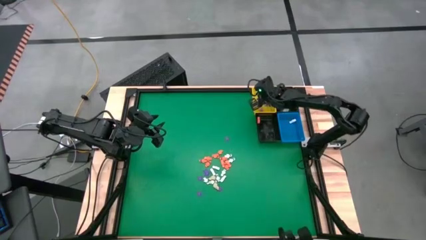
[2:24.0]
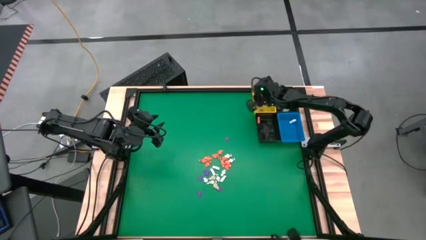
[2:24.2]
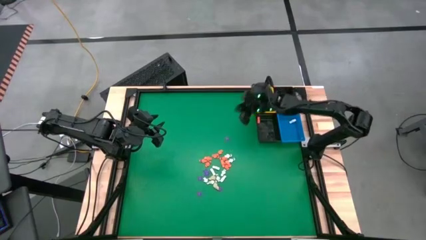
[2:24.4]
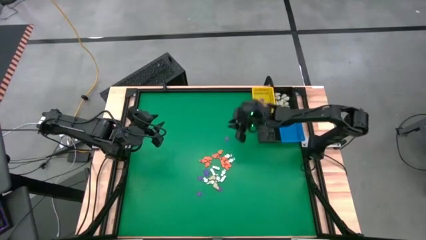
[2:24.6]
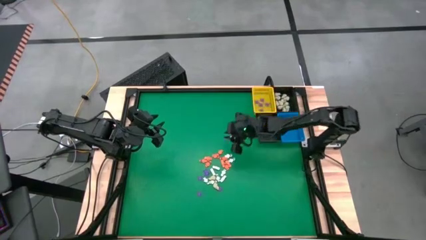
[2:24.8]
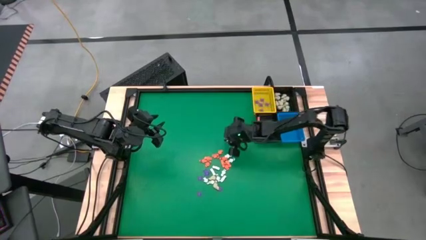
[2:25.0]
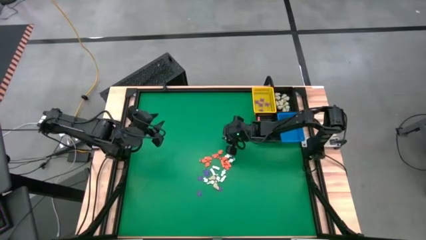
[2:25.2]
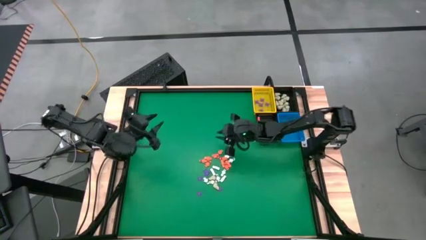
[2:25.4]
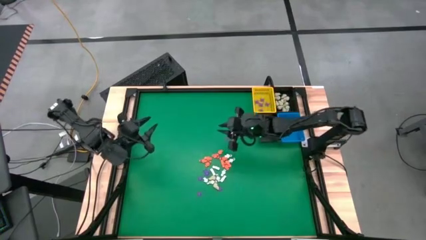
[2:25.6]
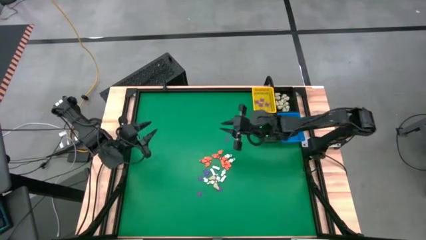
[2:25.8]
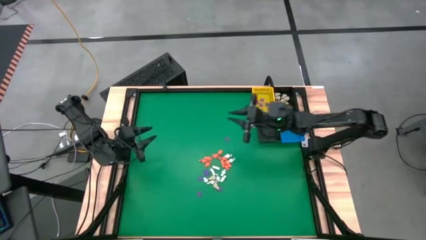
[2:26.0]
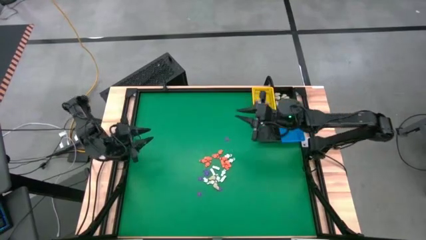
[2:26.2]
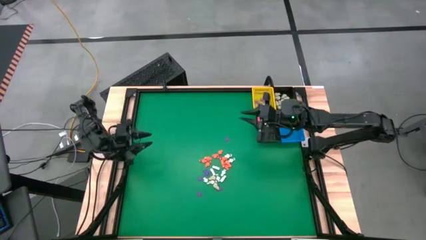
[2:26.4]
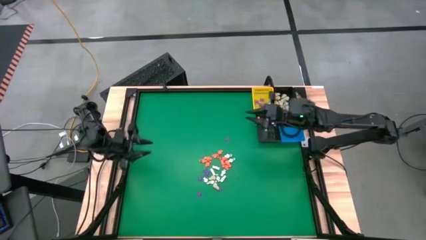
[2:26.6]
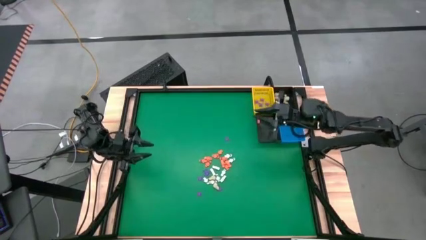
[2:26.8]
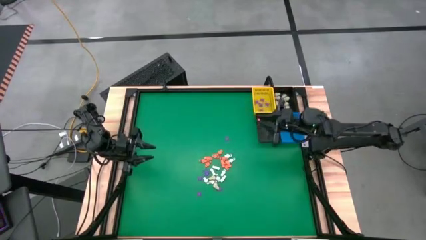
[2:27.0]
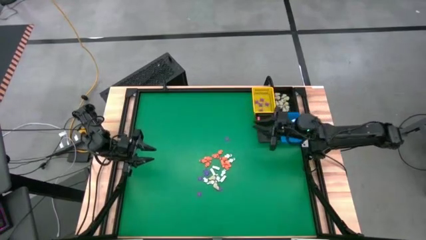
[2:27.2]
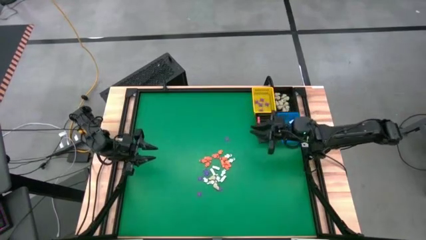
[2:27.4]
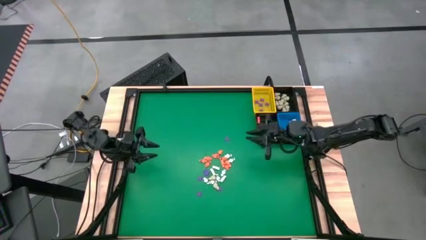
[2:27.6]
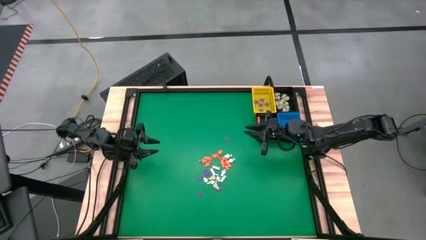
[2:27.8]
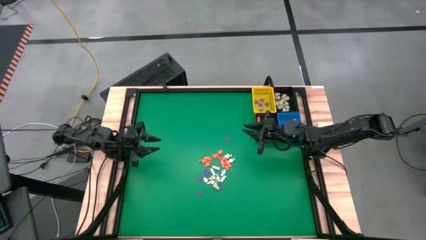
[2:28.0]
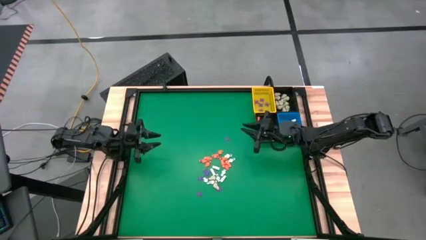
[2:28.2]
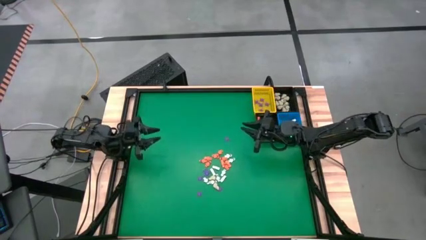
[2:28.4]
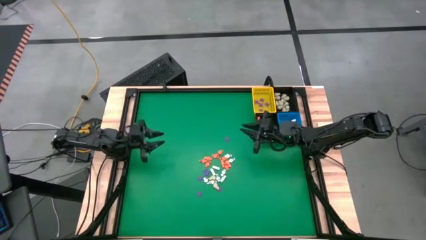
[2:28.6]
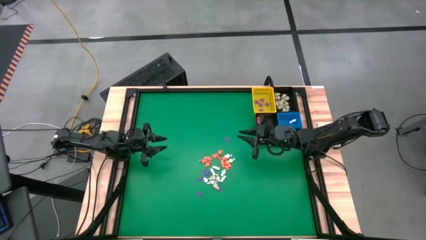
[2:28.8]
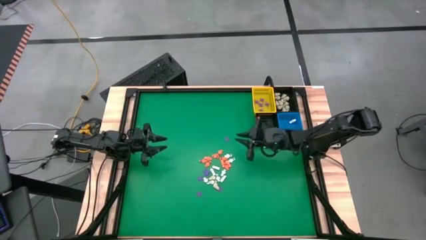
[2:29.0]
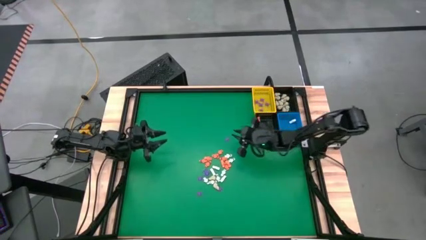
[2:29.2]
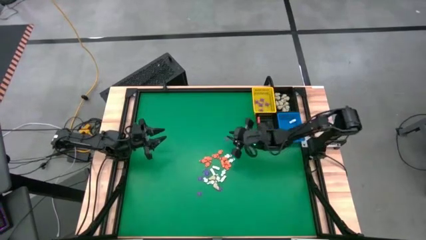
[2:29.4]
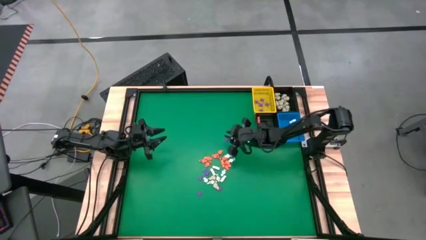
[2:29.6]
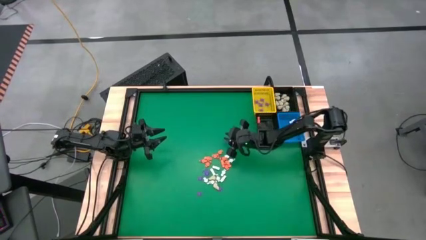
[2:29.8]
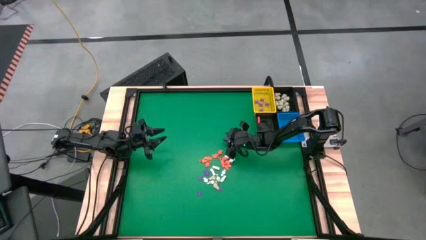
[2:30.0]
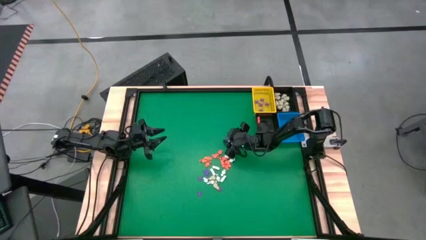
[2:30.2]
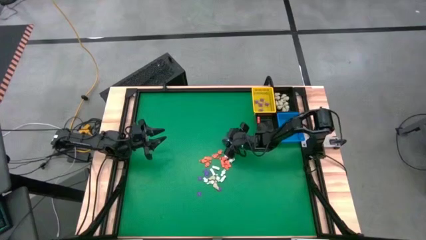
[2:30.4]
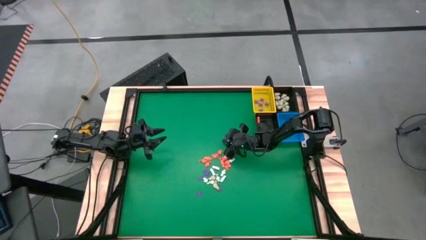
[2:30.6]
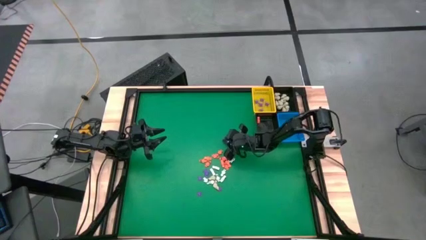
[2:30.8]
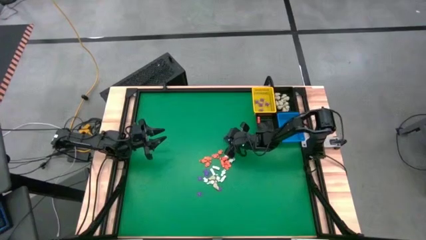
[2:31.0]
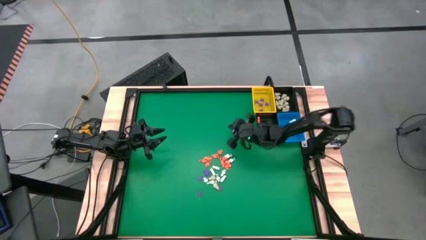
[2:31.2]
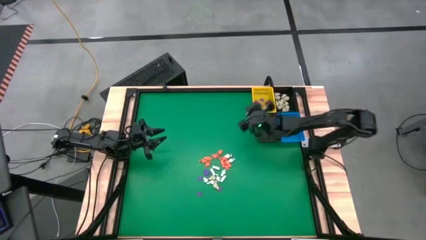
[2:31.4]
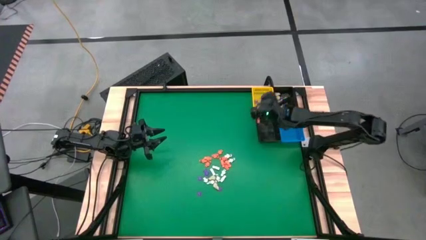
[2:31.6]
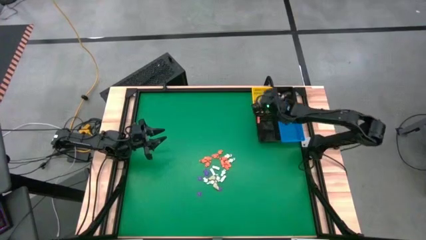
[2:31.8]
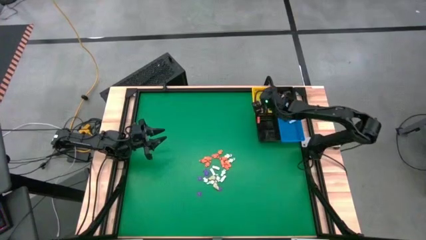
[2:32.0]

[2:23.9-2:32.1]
Task: Sort Halloween decoration
Put the purple spider toy into the yellow basket

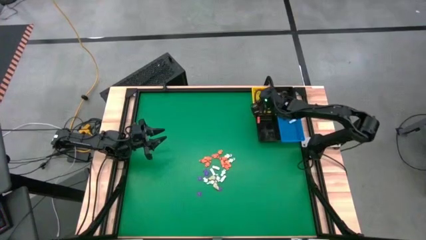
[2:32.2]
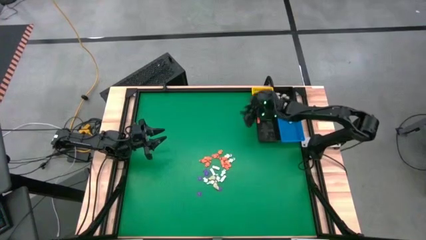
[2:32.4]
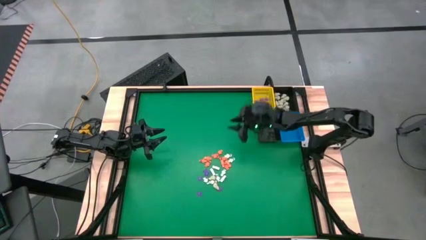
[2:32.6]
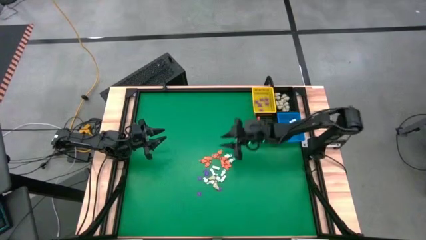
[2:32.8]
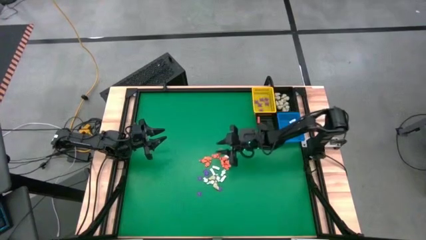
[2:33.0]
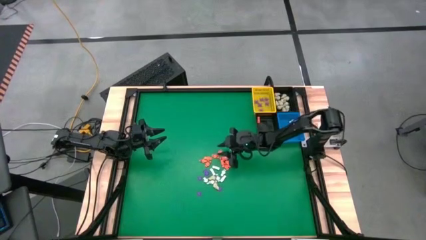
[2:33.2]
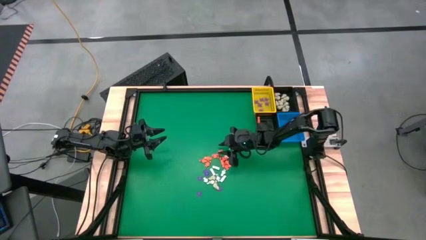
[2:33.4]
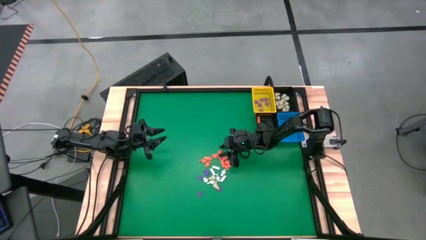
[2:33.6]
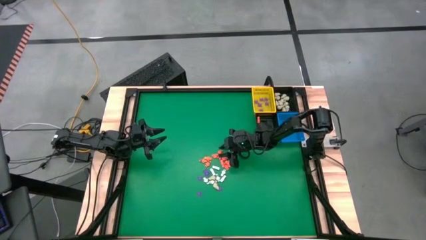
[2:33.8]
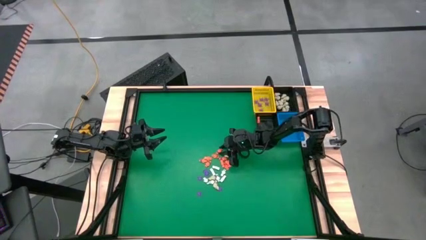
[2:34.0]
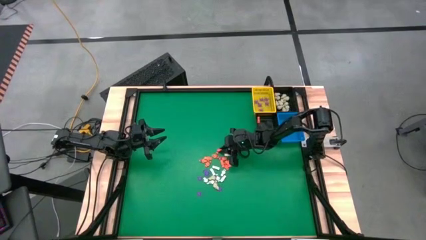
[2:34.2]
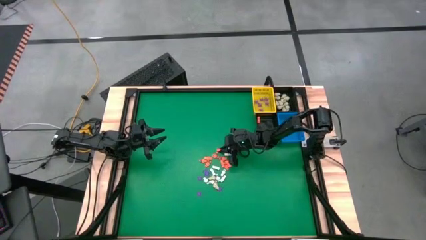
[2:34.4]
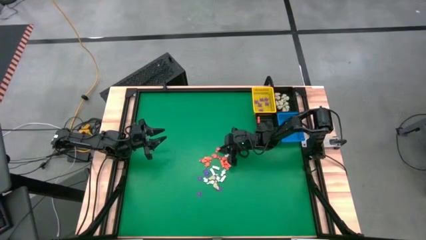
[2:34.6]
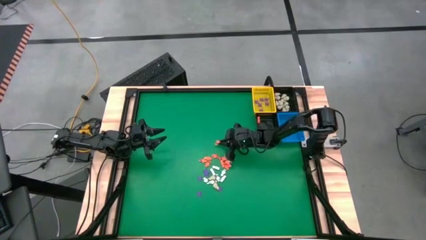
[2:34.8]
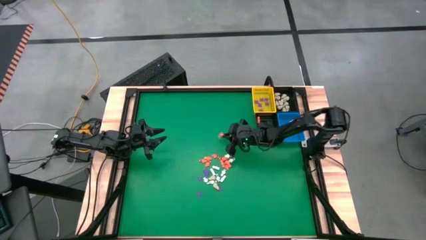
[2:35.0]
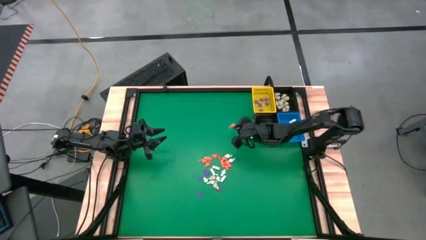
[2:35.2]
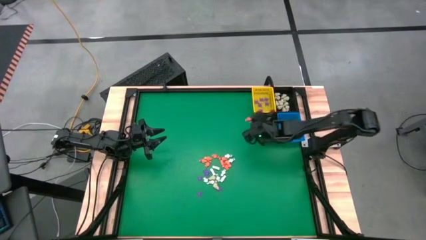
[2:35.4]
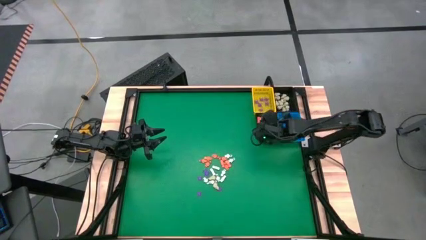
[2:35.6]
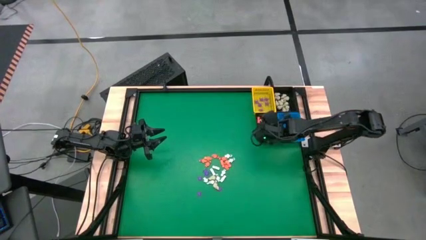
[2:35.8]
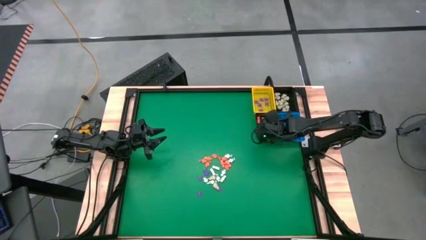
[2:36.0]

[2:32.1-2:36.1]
Put the orange skeleton toy into the bottom black basket

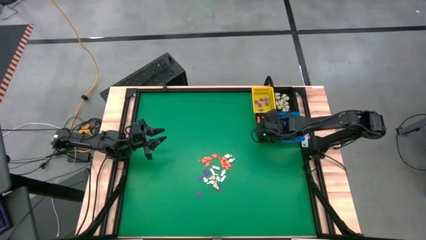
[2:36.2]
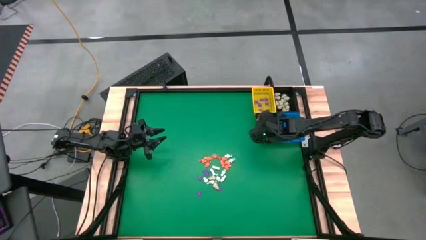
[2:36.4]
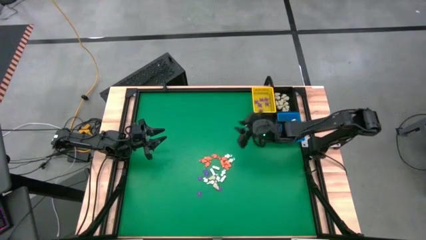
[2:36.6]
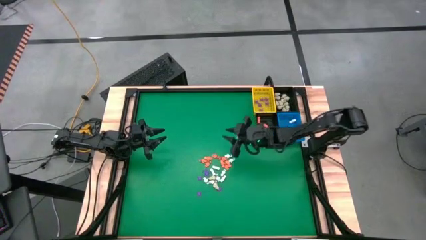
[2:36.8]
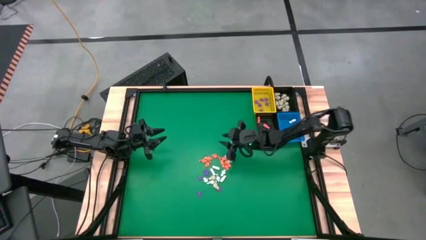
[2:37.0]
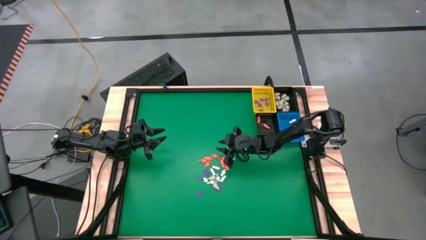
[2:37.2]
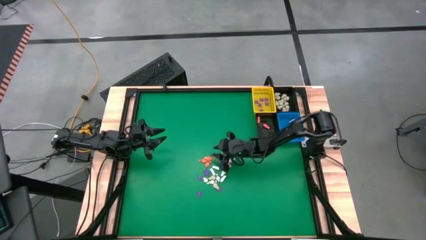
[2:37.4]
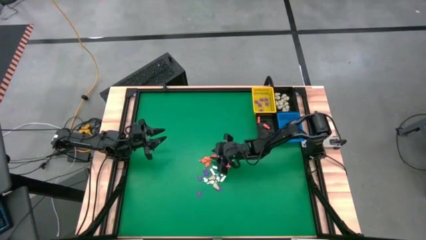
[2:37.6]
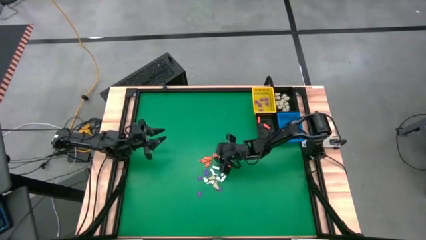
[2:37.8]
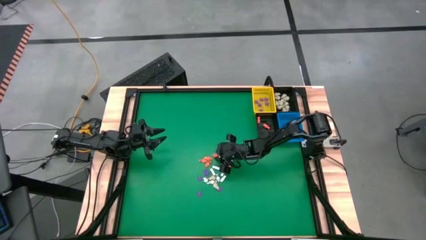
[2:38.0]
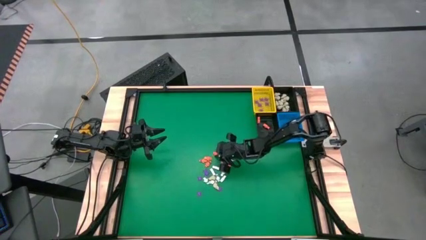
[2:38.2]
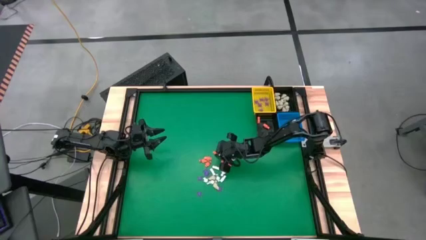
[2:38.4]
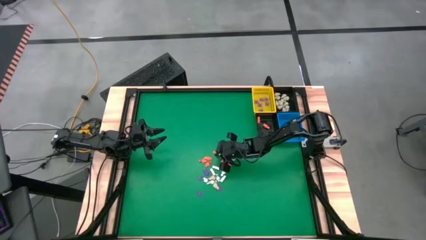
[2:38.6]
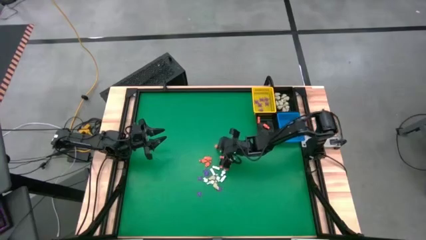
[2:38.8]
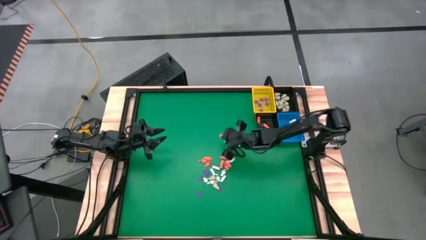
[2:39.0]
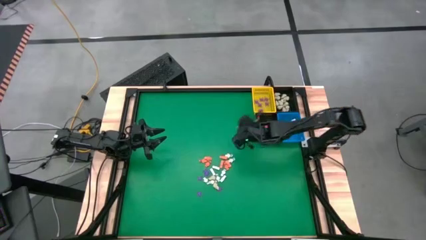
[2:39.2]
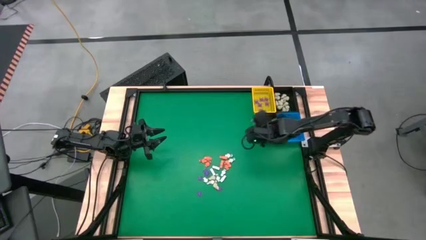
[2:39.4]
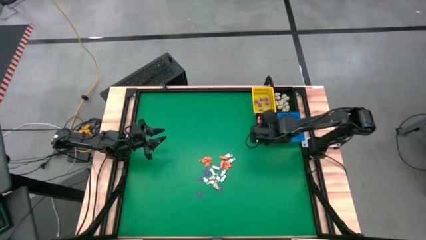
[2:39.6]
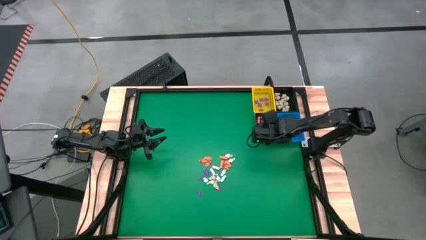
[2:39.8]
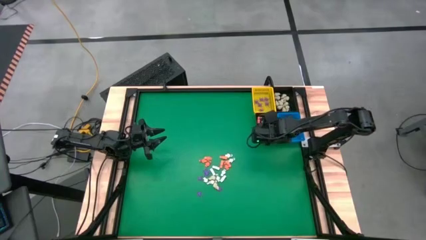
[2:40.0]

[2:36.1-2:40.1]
Put the orange skeleton toy into the bottom black basket
